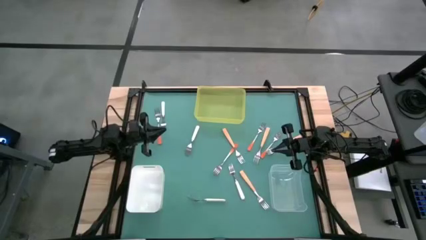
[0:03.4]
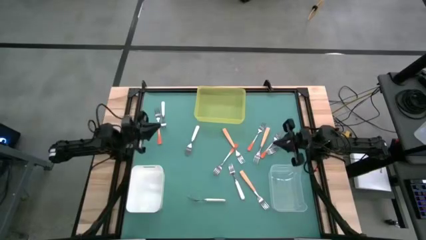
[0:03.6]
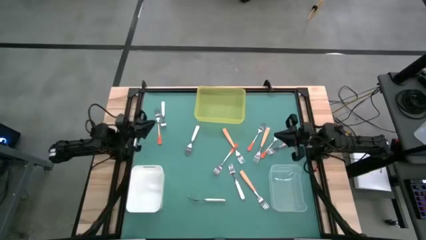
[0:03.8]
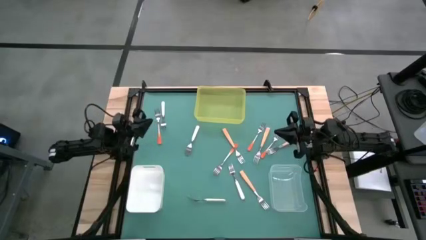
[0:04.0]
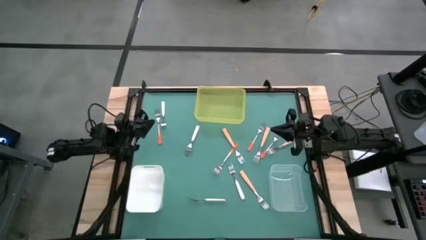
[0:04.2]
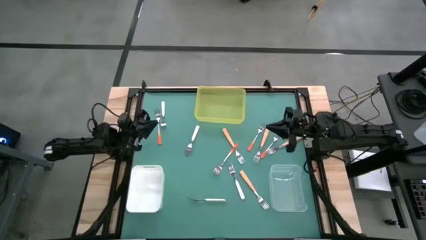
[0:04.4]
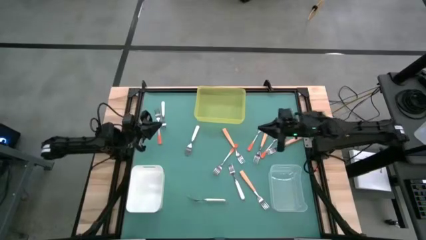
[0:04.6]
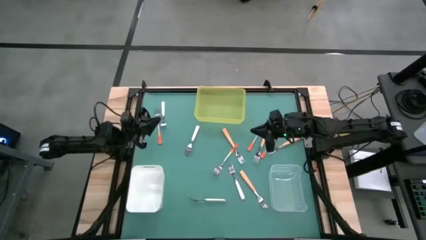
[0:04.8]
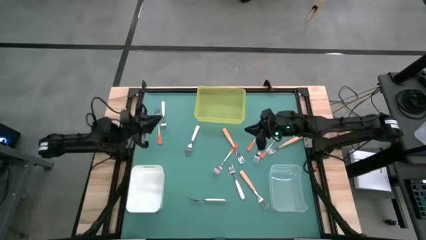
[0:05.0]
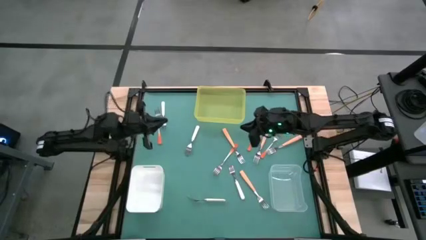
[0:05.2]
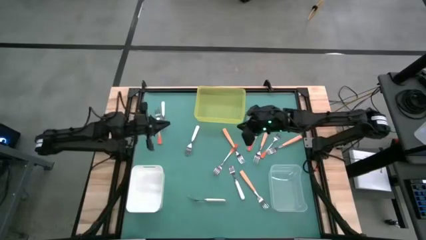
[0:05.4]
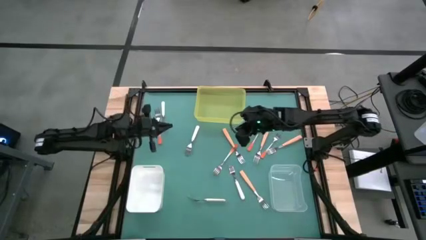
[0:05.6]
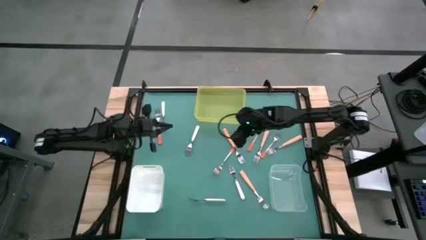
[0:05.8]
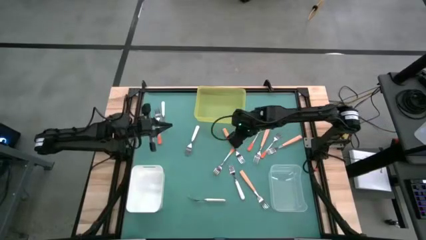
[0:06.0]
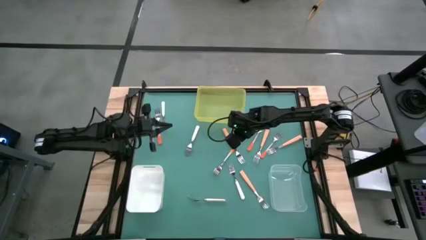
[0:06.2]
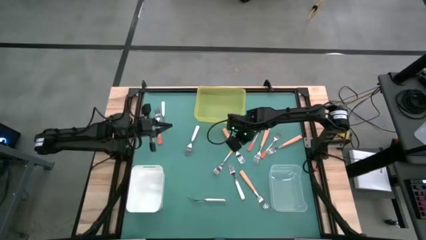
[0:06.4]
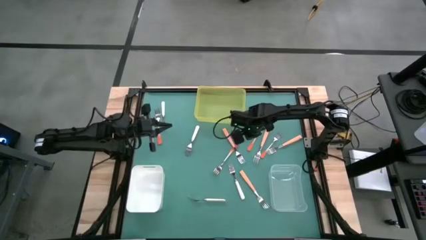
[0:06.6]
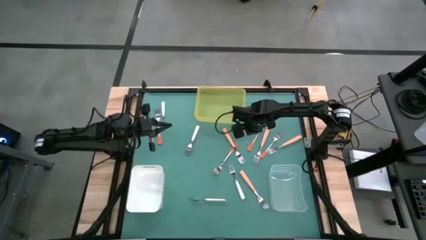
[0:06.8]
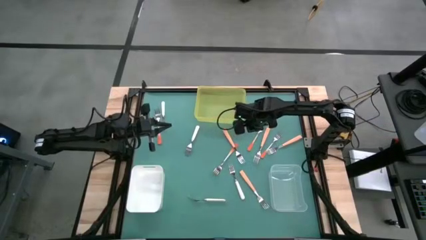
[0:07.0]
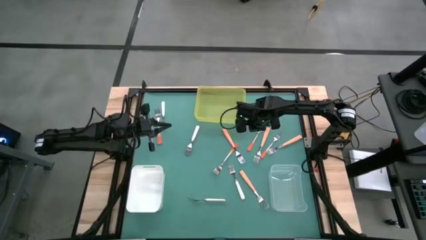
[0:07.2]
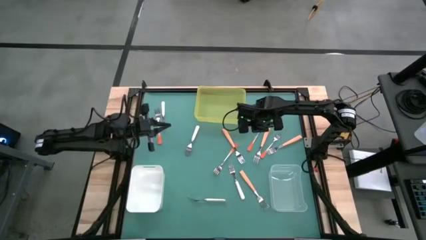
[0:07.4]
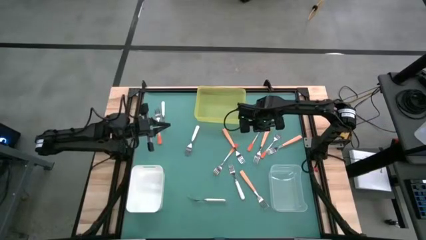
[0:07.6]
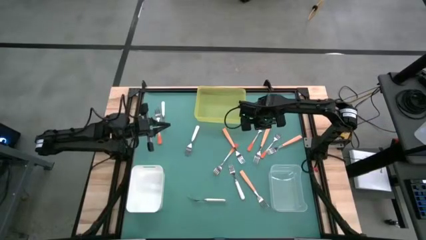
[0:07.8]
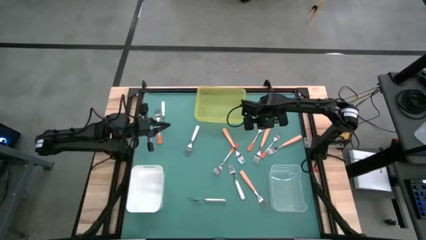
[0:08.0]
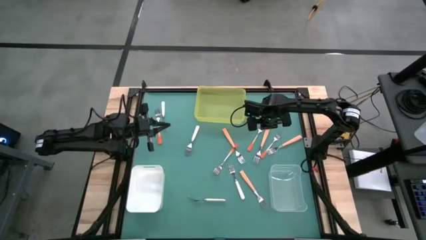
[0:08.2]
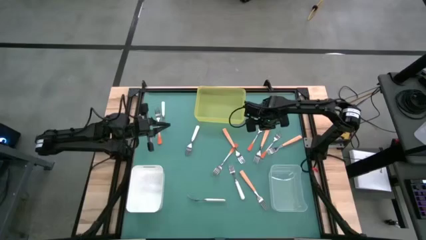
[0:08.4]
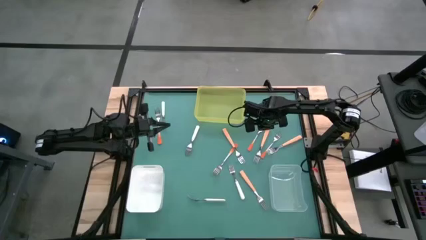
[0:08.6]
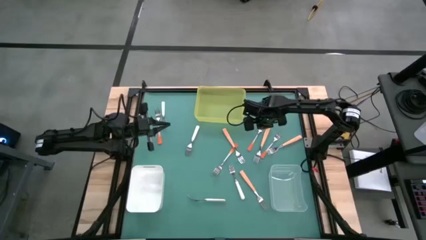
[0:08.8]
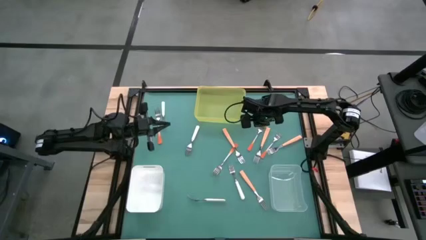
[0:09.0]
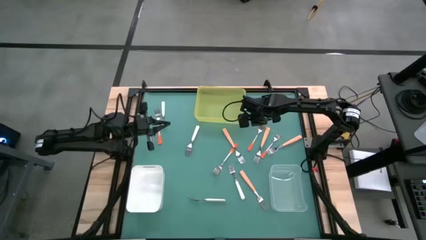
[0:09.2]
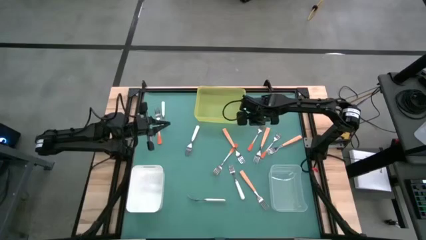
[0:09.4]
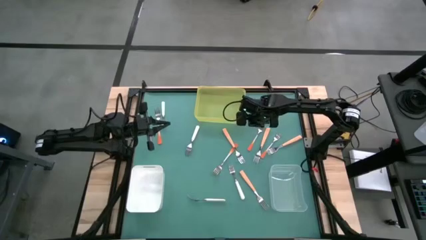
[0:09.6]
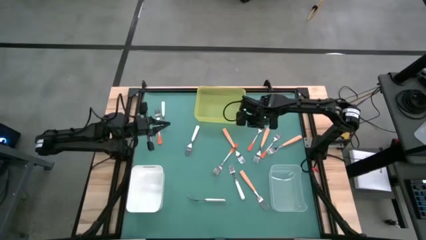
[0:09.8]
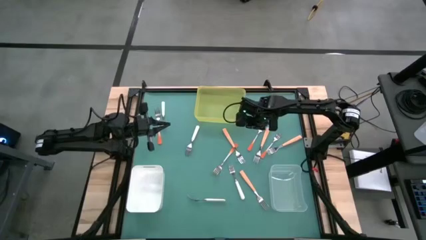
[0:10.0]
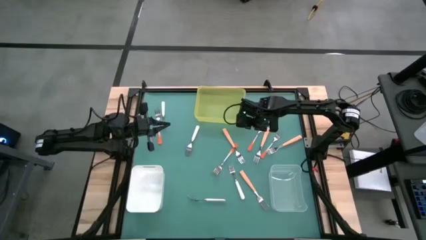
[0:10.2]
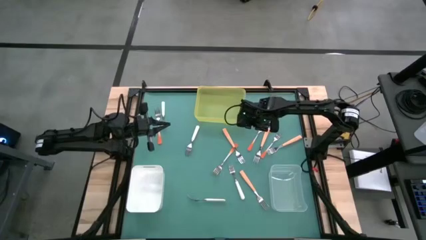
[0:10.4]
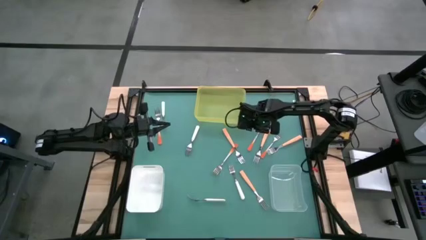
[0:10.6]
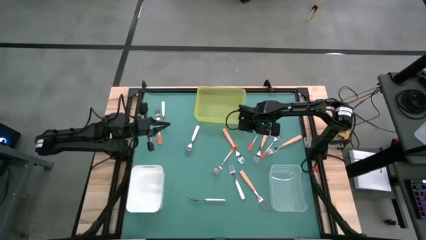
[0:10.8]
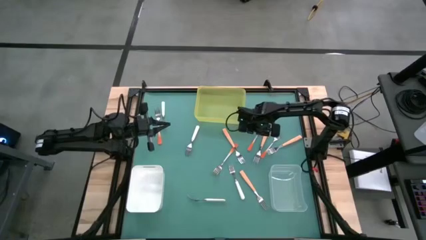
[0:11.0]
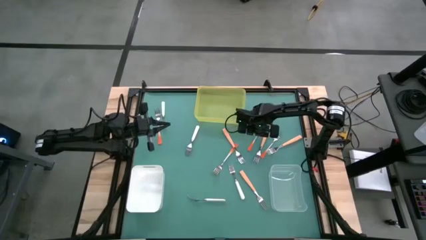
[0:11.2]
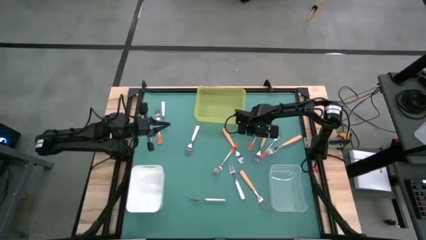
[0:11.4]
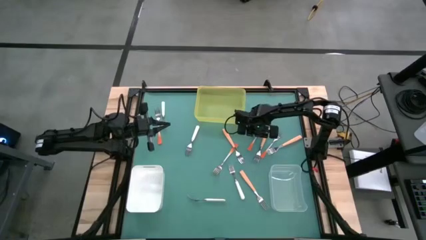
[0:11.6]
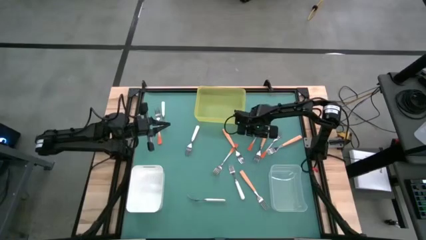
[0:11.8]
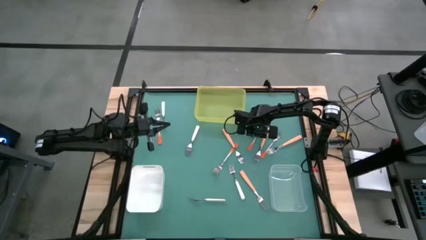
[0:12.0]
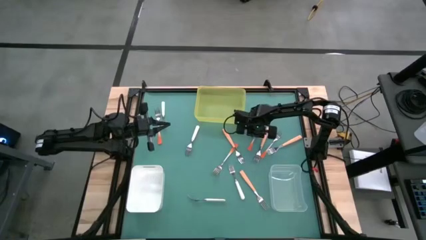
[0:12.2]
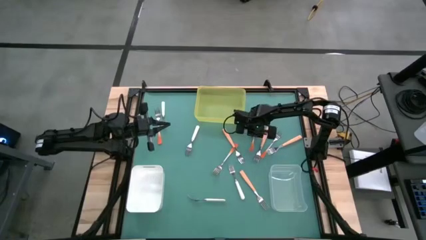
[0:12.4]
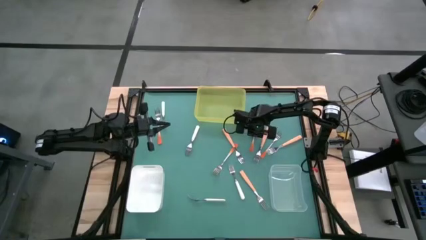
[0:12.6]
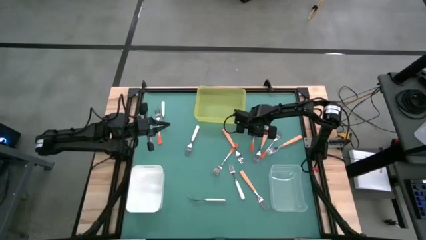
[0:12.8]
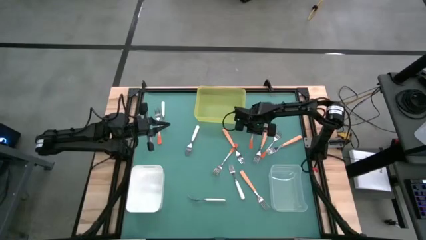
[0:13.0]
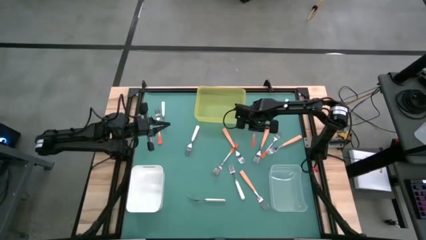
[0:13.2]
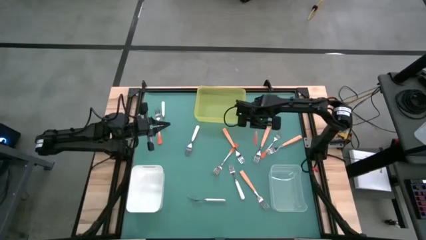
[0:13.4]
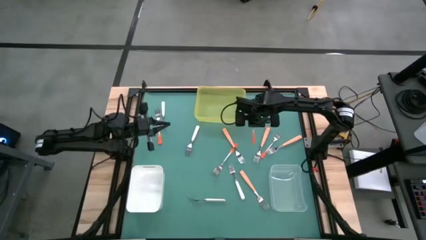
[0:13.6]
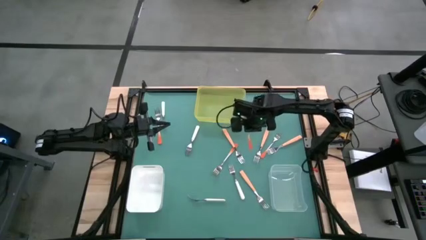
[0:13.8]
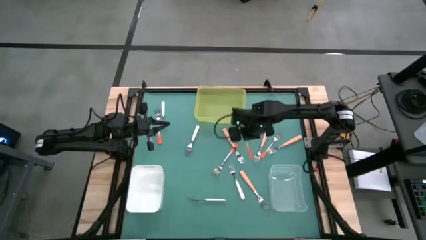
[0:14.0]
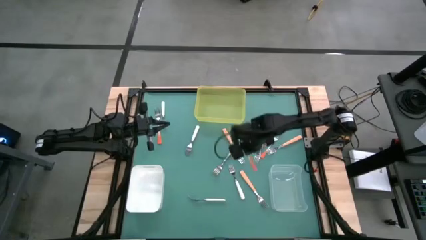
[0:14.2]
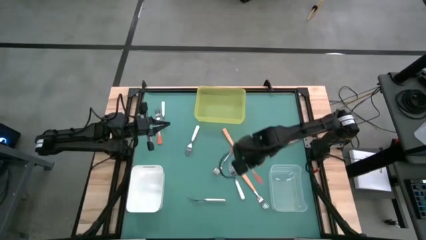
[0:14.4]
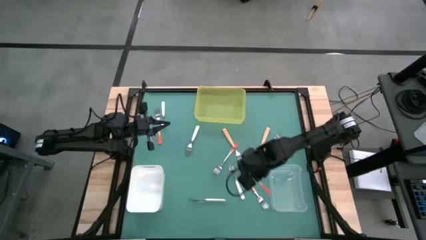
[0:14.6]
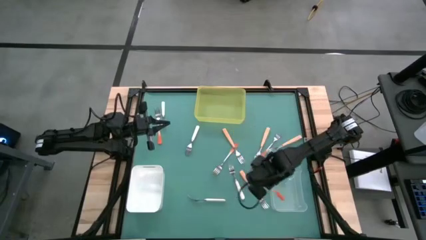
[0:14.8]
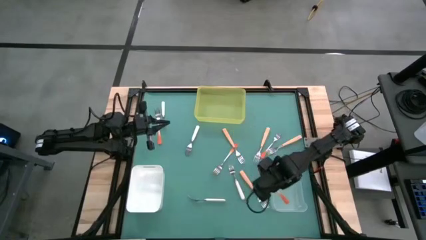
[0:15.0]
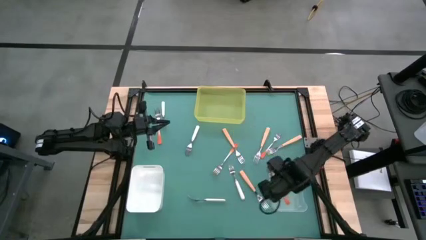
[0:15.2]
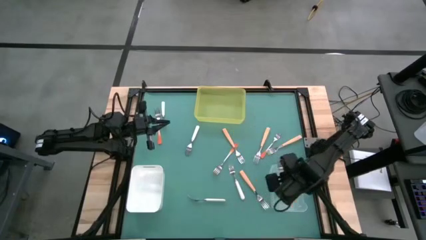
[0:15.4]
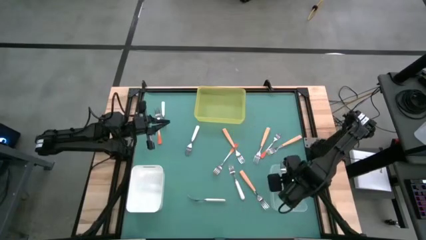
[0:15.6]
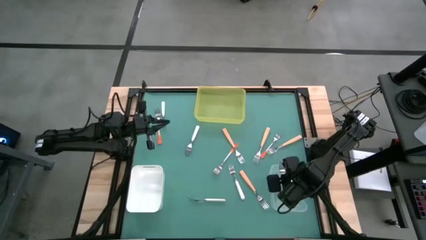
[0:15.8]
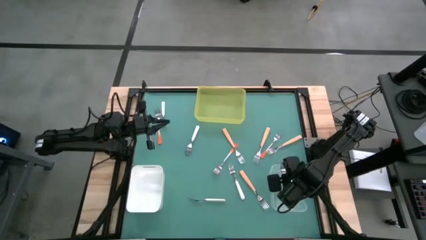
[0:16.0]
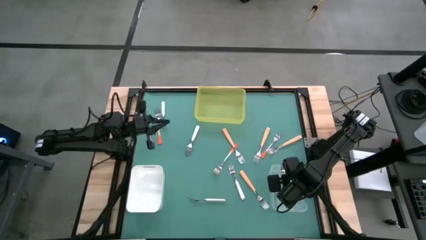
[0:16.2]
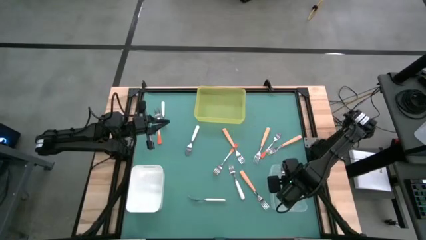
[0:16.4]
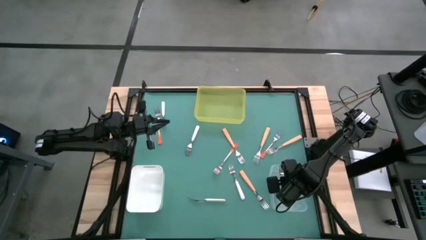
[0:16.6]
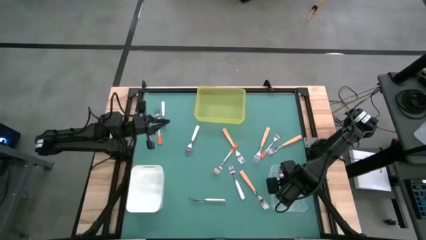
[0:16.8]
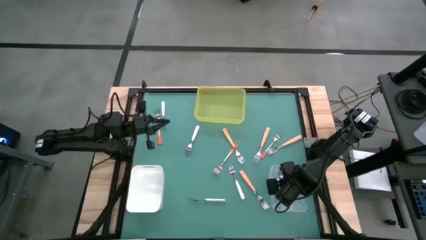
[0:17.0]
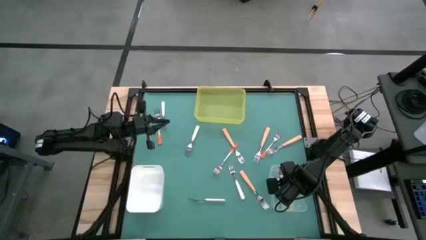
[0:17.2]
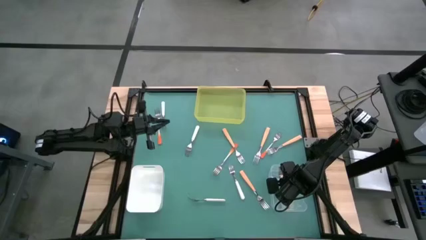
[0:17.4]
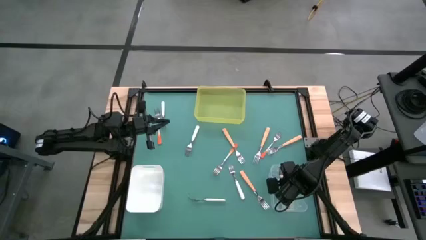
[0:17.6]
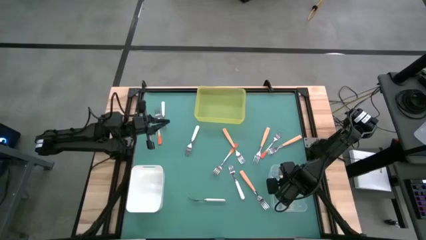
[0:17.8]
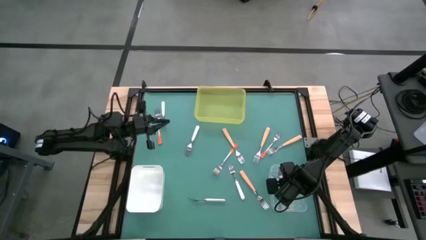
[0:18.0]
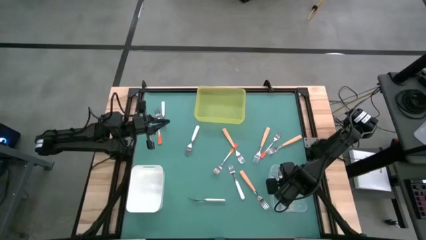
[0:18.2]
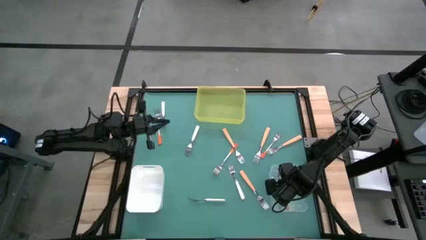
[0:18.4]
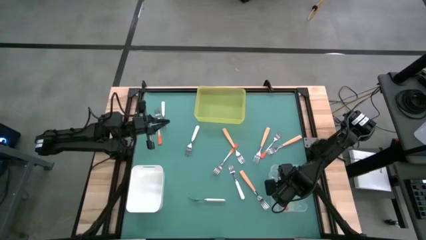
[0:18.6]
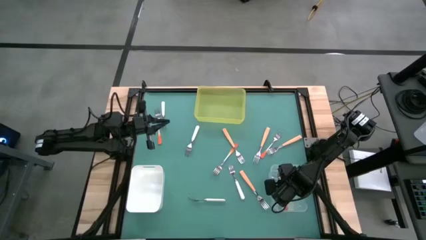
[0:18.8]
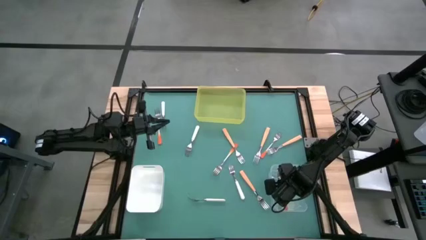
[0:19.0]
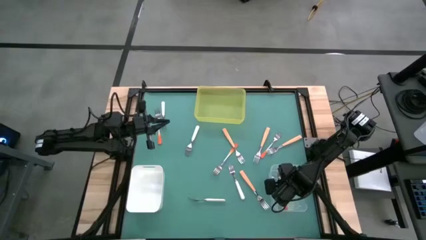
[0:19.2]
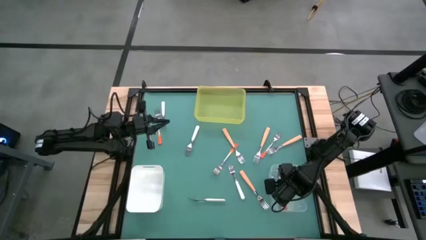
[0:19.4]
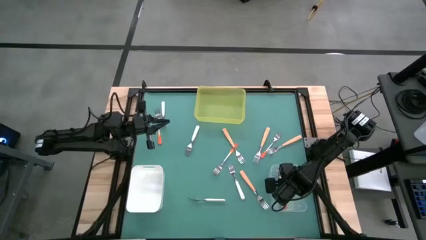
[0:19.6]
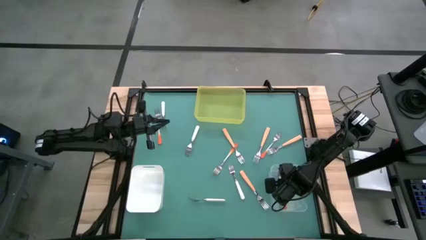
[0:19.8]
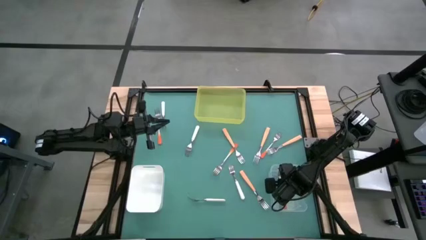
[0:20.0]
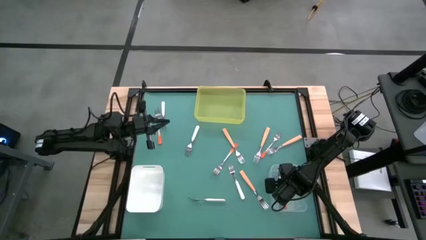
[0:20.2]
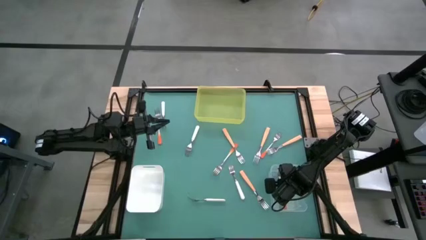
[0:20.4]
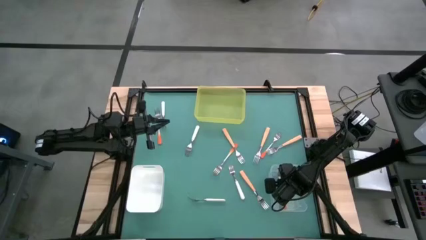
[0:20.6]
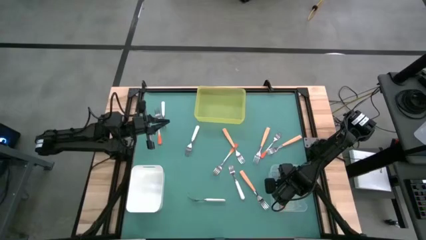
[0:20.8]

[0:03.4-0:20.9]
Task: Sort silverware by color (type)
Put the orange fork into the transparent bin
